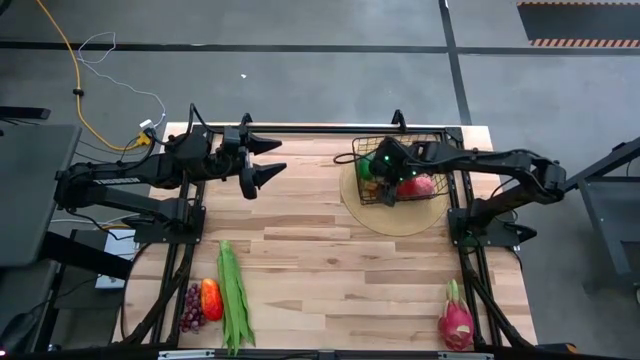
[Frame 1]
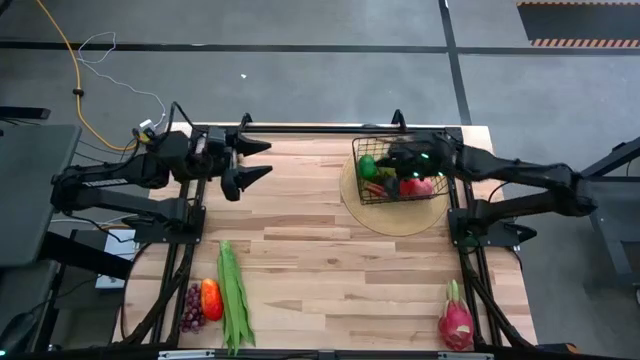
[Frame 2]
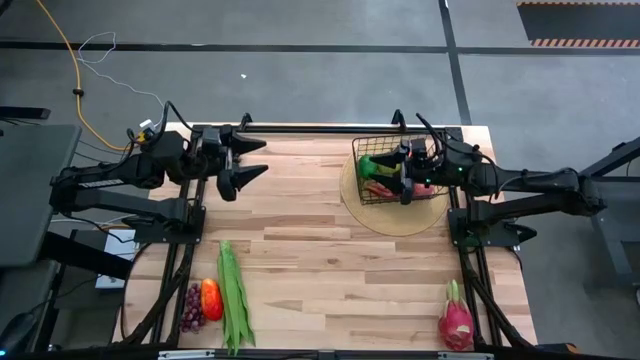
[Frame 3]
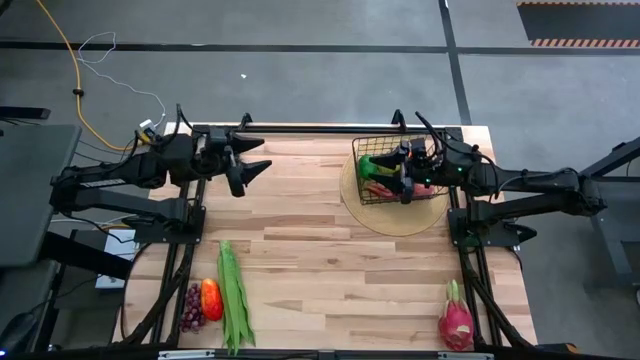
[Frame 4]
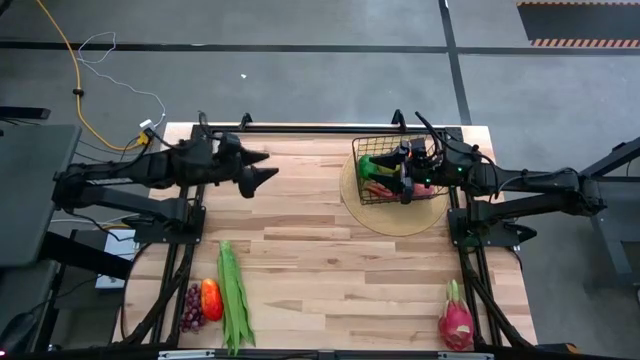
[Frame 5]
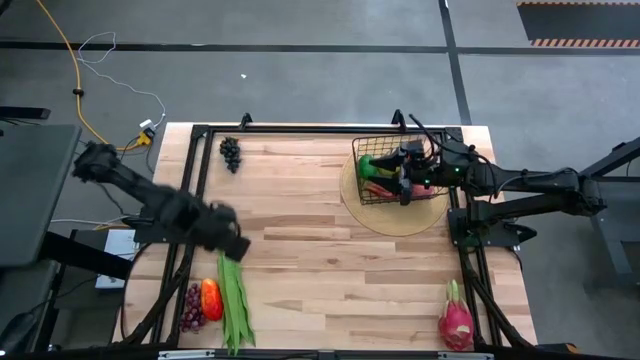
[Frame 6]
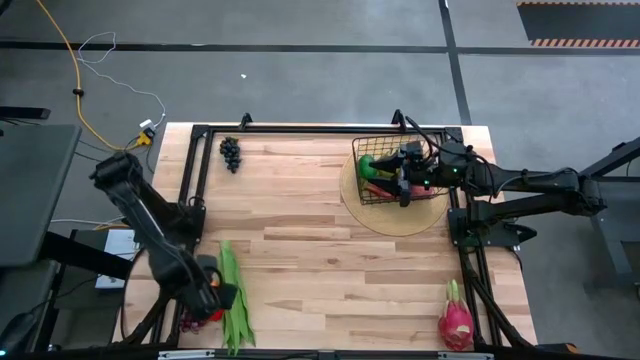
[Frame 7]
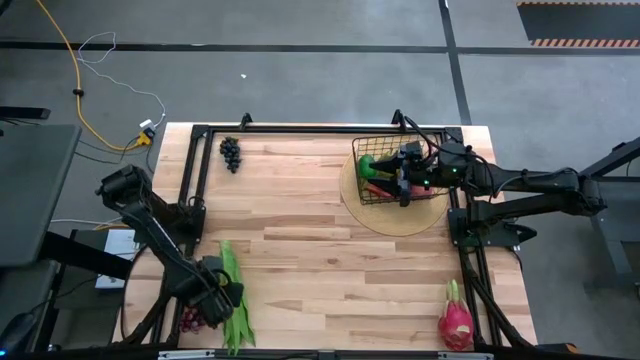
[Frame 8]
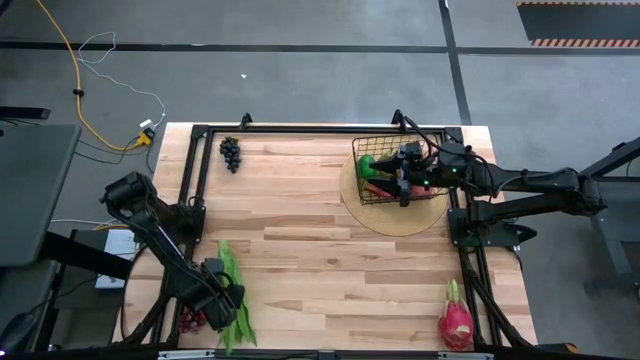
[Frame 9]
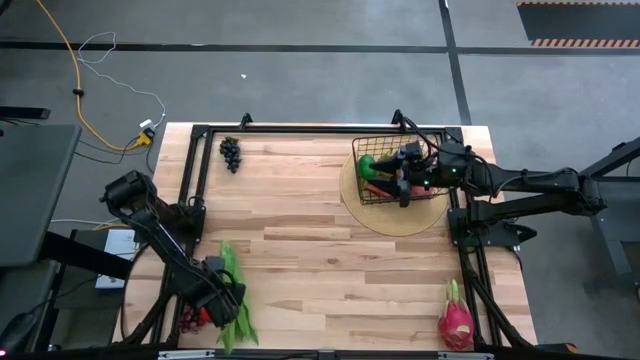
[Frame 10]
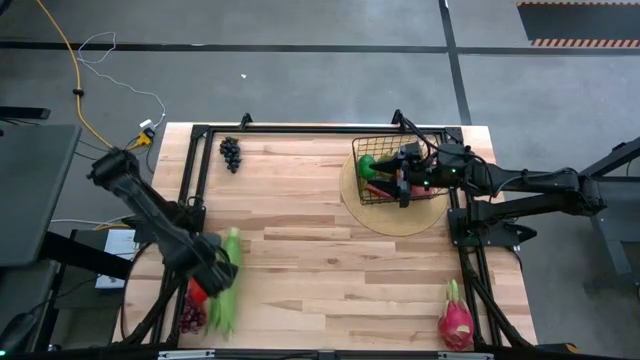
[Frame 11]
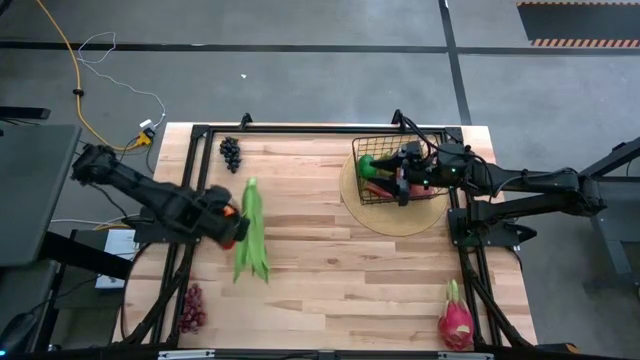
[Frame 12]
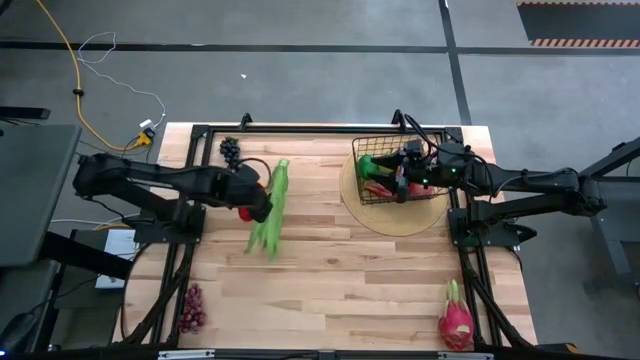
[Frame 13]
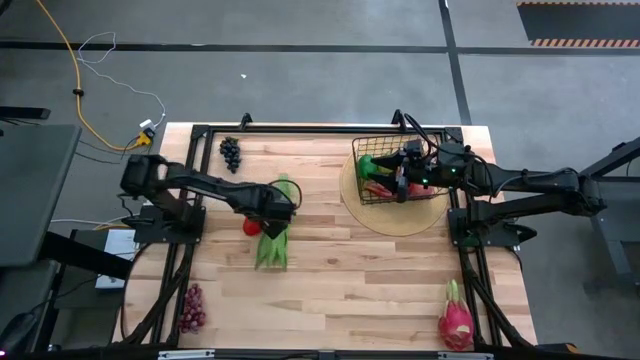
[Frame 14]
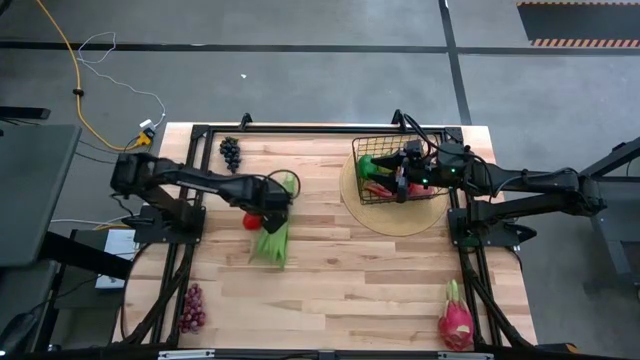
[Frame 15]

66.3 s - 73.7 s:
Task: Build produce basket
Put the orange mango into the black wire basket

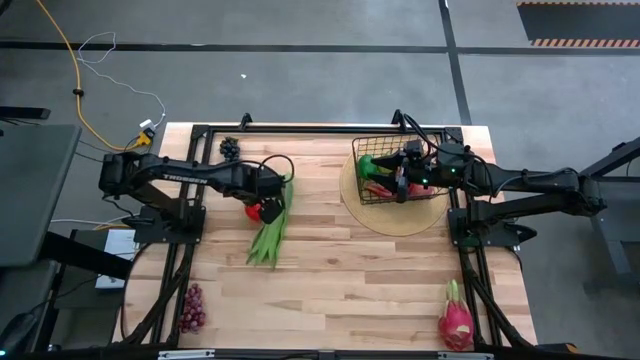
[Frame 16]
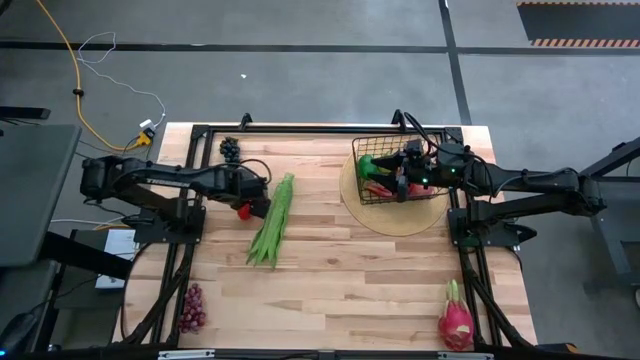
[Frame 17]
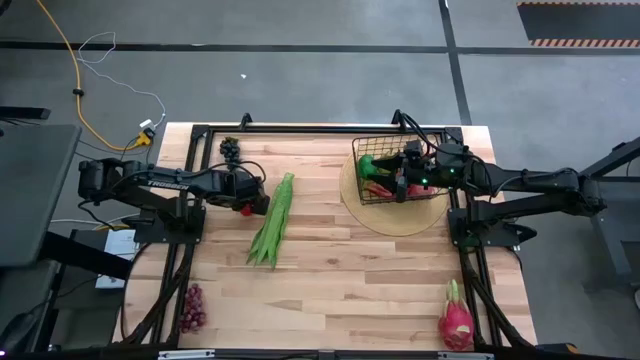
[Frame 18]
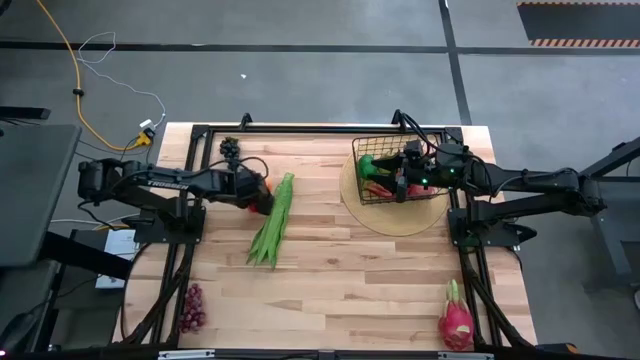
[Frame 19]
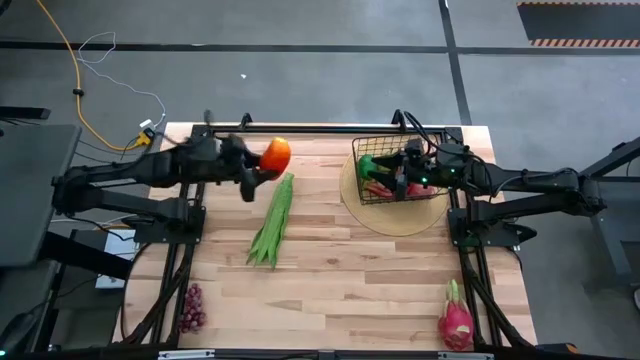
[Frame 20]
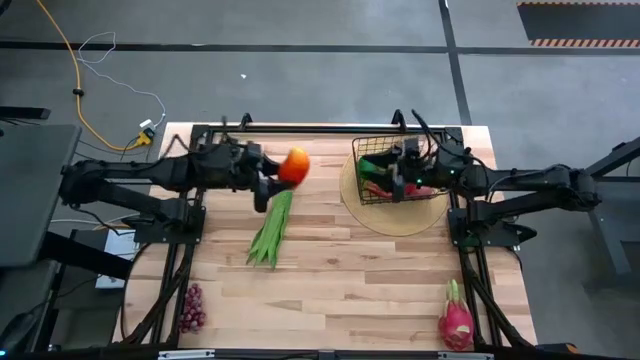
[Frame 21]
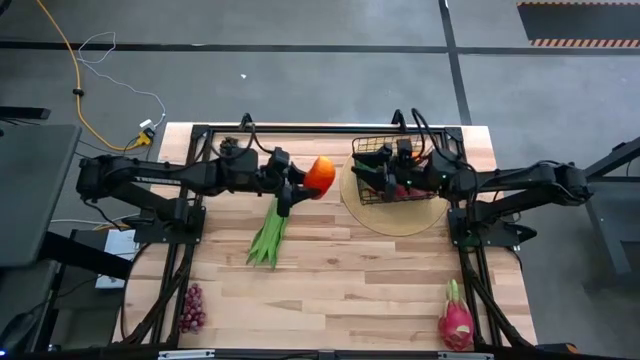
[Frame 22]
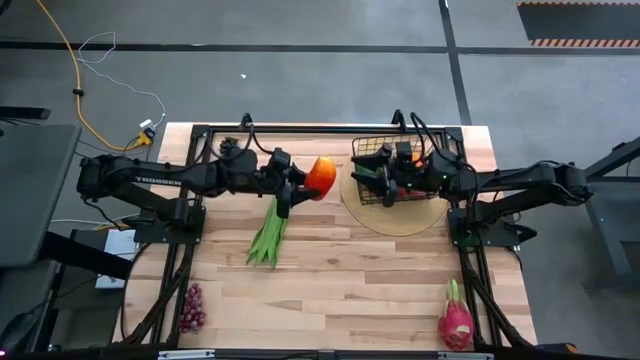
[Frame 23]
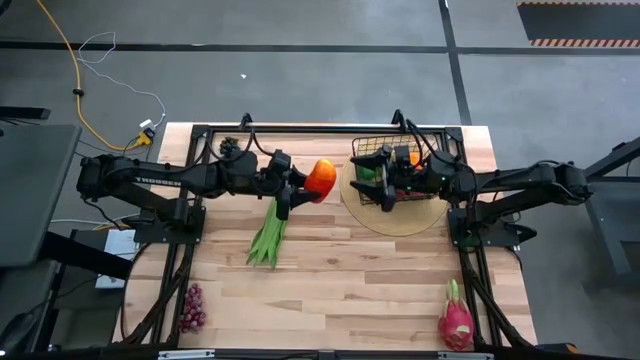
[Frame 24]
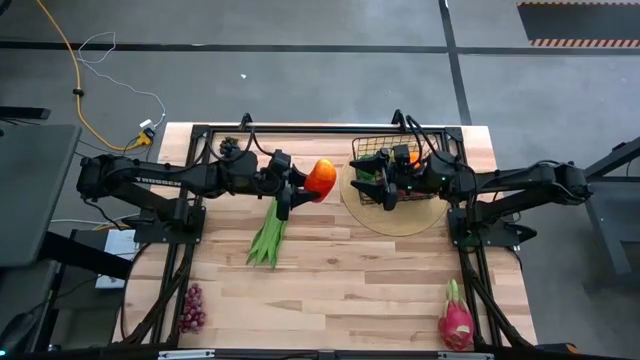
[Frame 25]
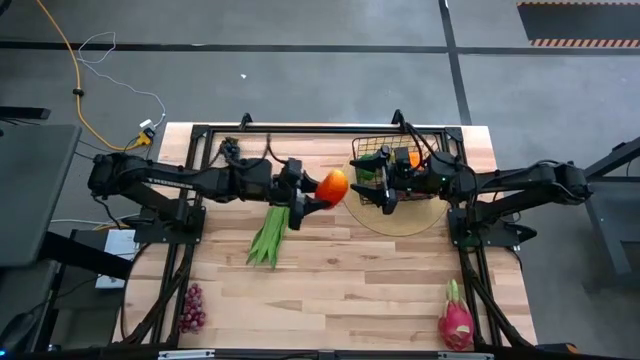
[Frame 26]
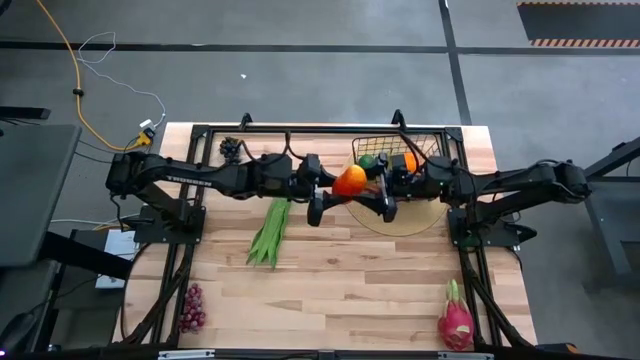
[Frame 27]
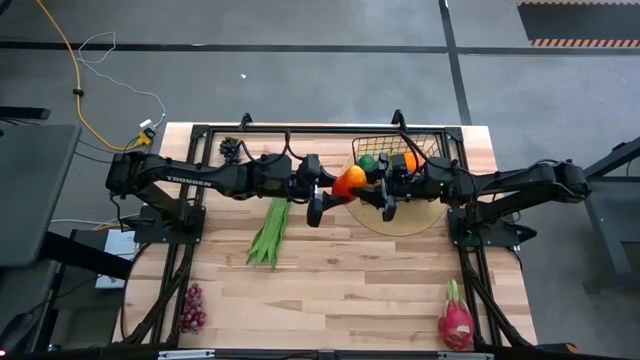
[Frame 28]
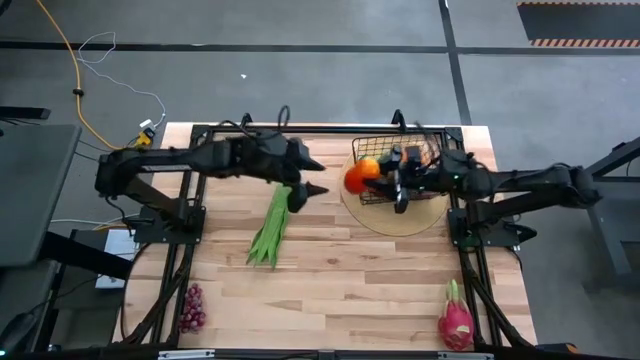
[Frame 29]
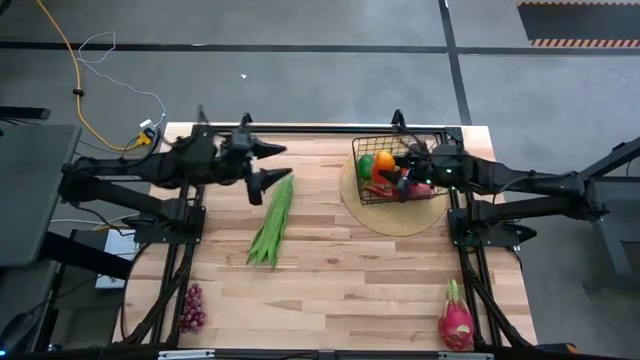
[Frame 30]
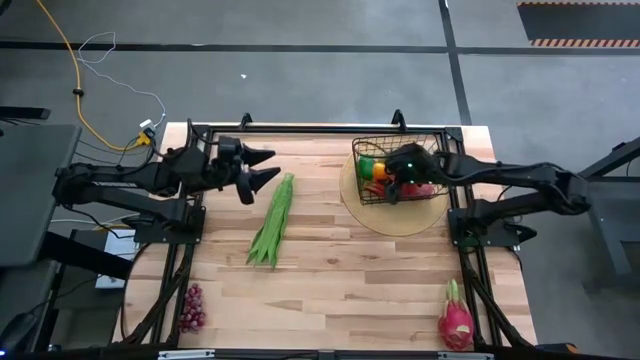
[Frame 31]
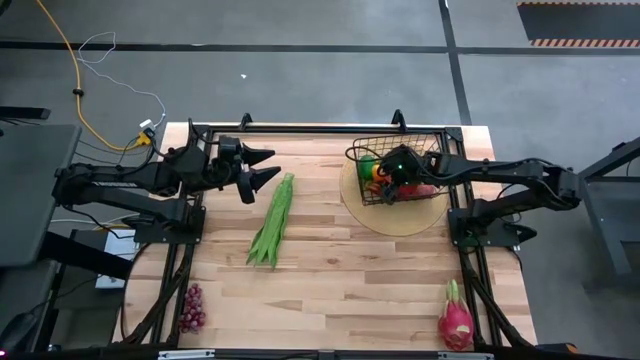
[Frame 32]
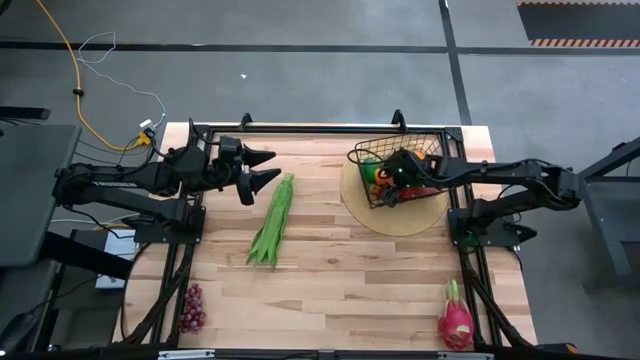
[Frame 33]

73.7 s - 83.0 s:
Put the orange mango into the black wire basket

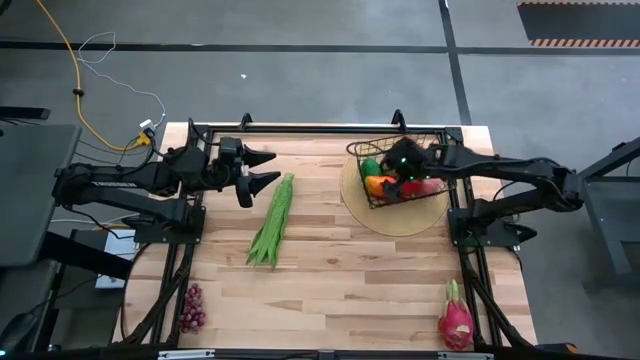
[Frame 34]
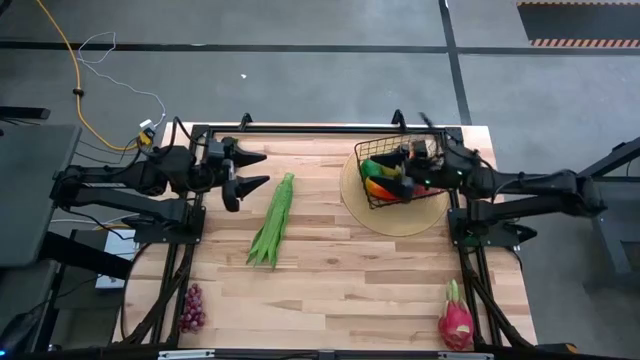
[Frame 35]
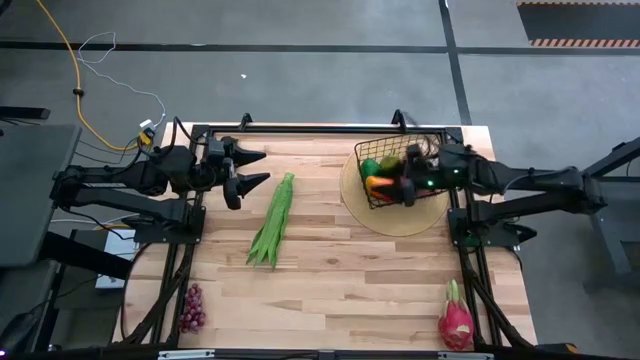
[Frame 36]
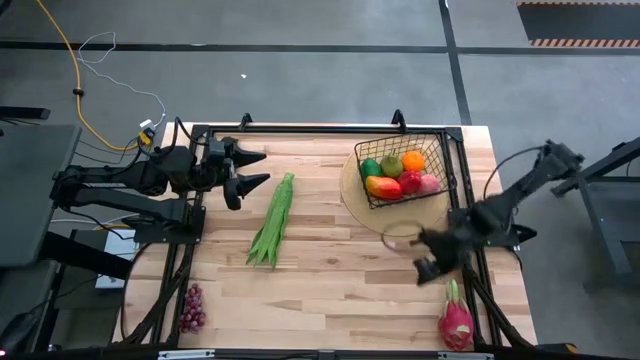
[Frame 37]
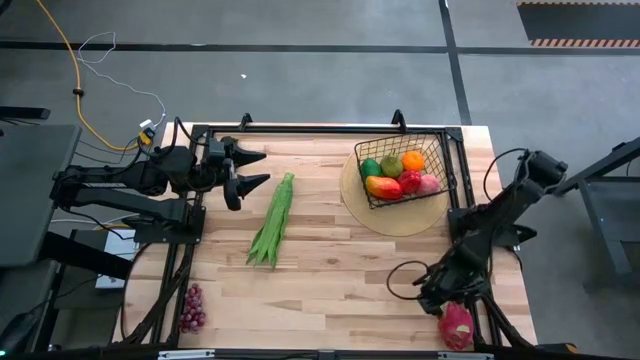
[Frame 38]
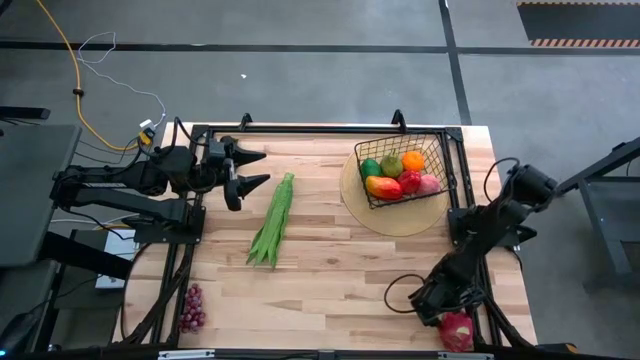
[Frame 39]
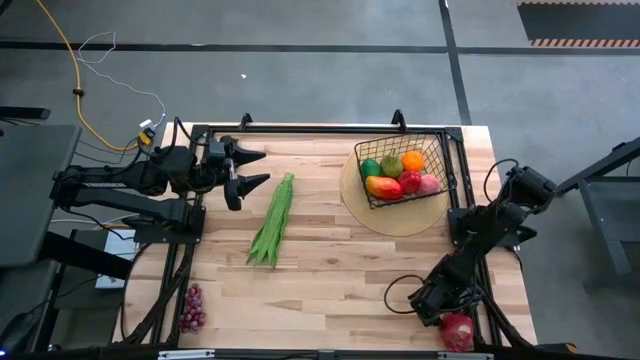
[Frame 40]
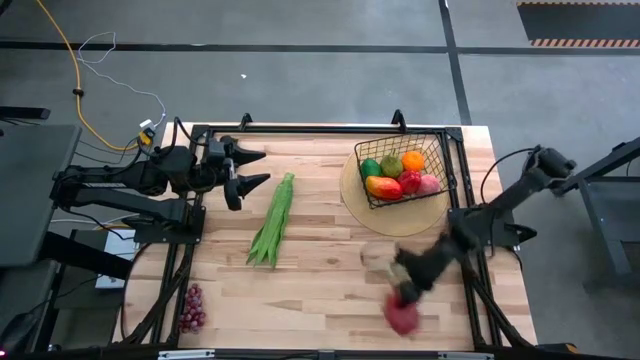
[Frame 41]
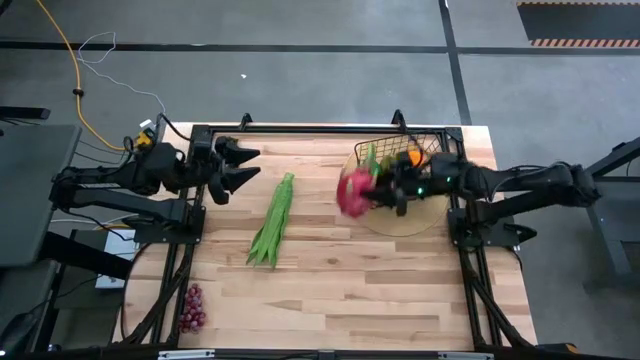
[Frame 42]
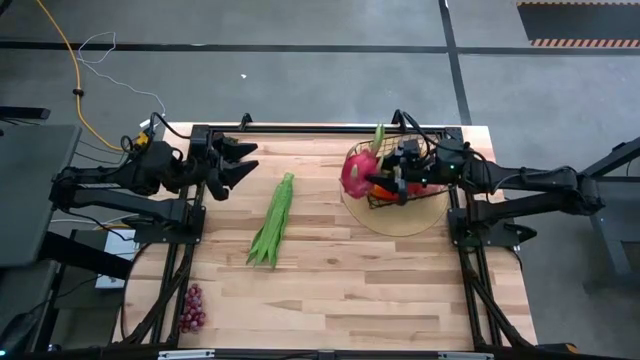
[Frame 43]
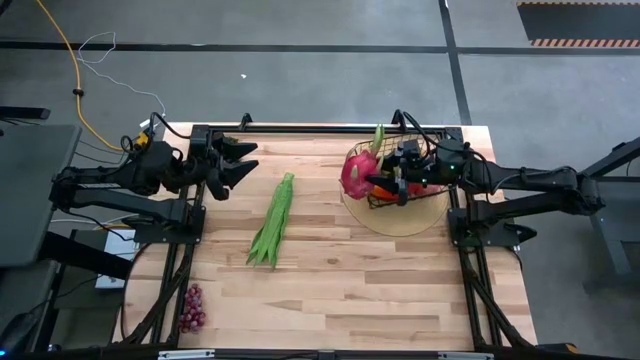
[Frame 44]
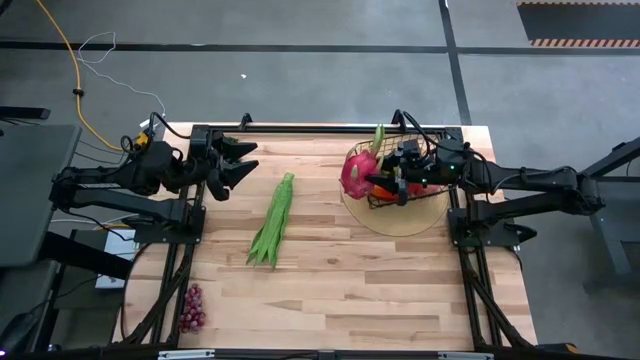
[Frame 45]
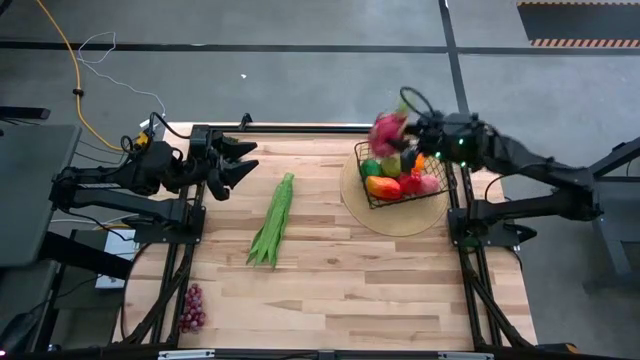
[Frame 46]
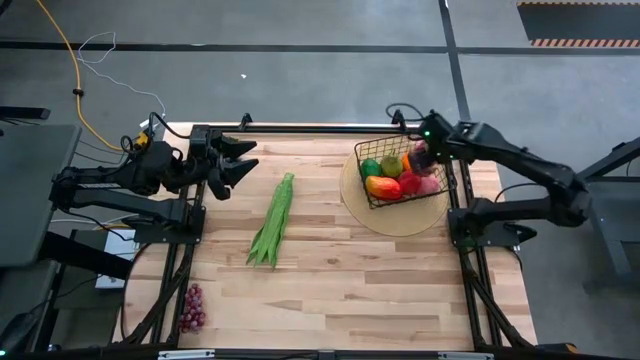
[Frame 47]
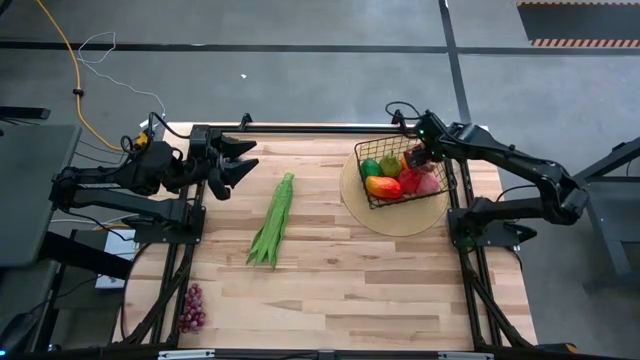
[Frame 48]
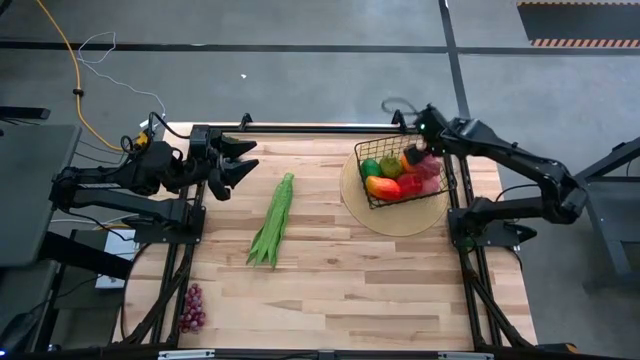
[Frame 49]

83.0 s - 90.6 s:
Put the pink dragonfruit into the black wire basket
